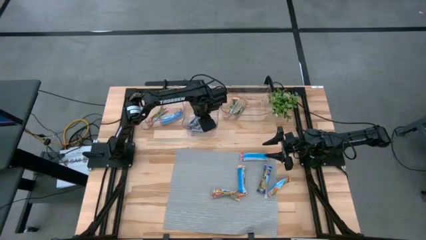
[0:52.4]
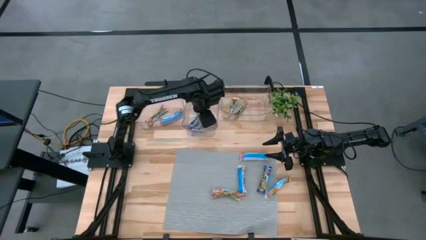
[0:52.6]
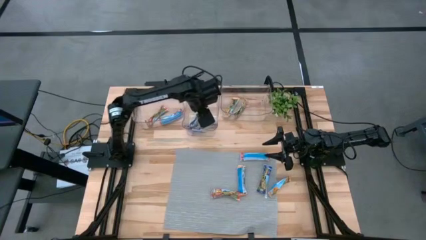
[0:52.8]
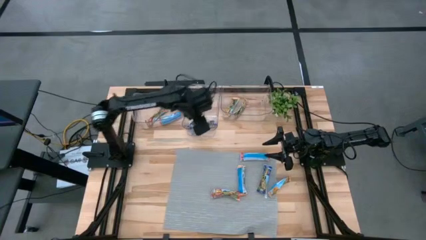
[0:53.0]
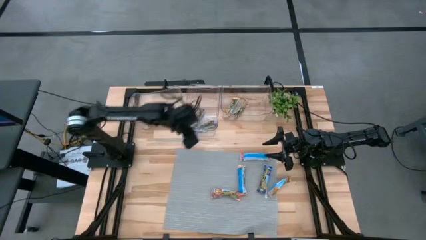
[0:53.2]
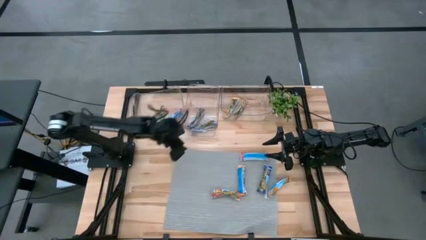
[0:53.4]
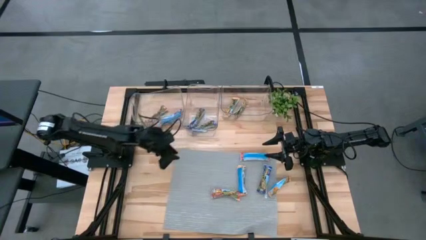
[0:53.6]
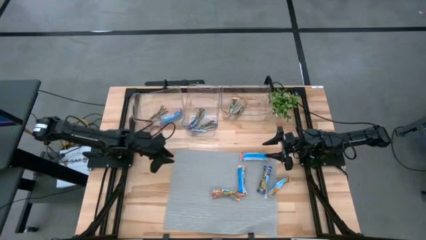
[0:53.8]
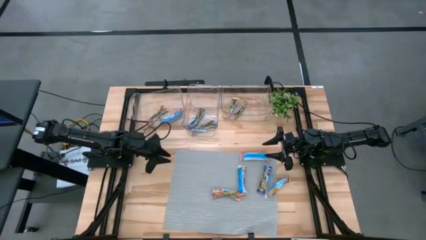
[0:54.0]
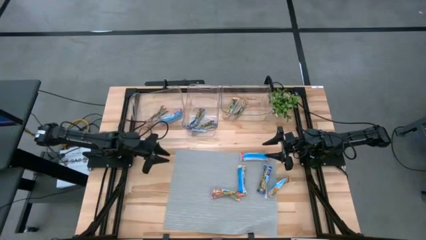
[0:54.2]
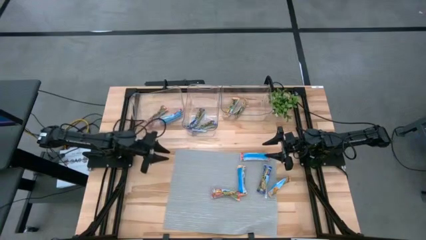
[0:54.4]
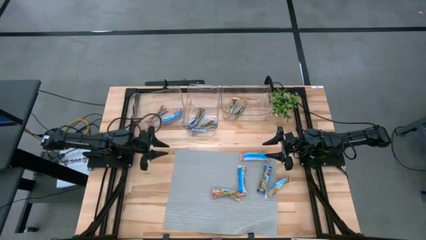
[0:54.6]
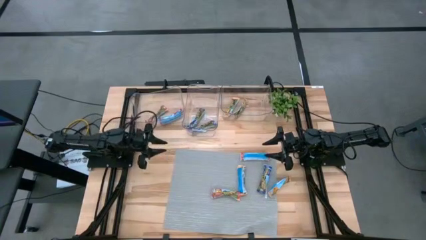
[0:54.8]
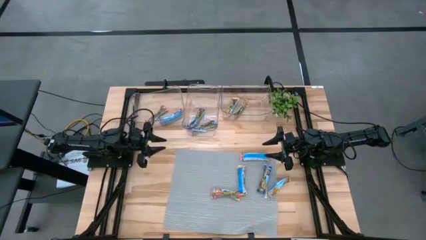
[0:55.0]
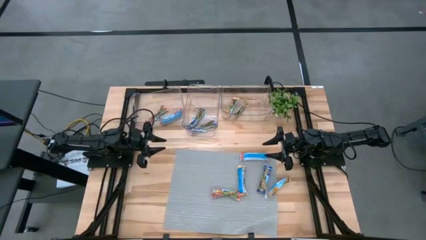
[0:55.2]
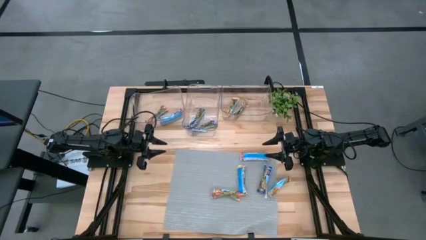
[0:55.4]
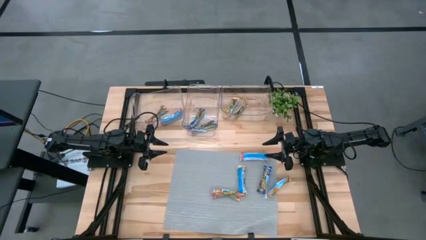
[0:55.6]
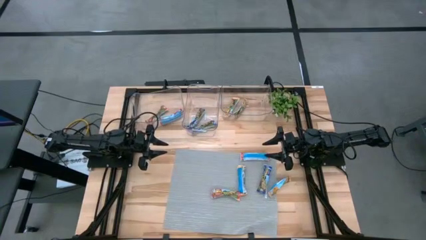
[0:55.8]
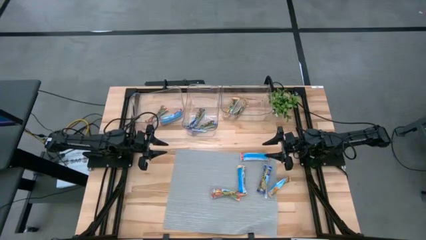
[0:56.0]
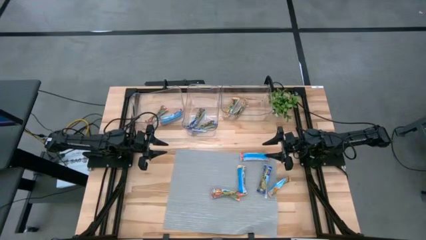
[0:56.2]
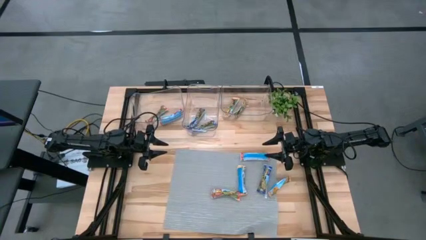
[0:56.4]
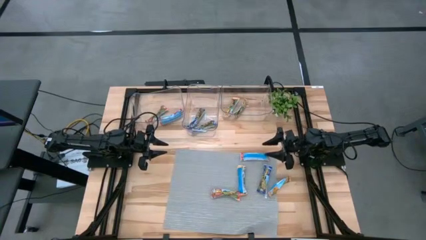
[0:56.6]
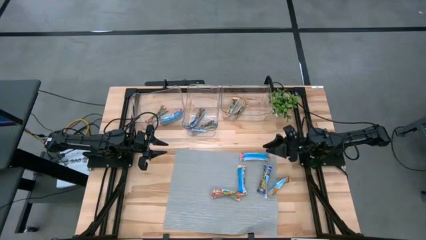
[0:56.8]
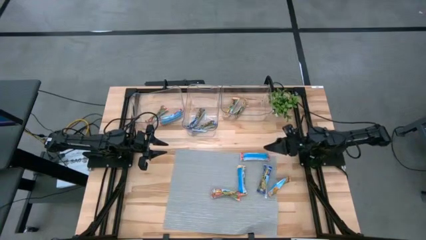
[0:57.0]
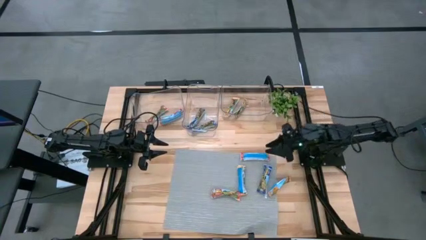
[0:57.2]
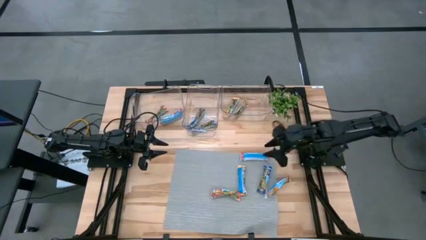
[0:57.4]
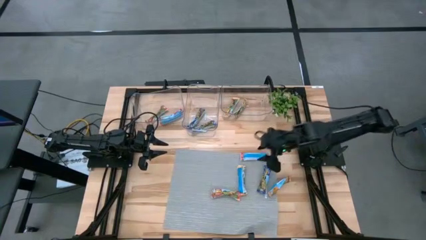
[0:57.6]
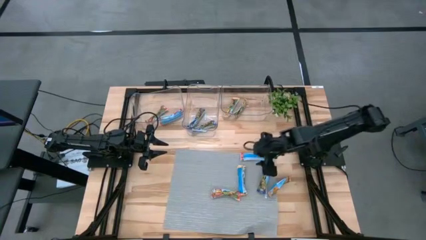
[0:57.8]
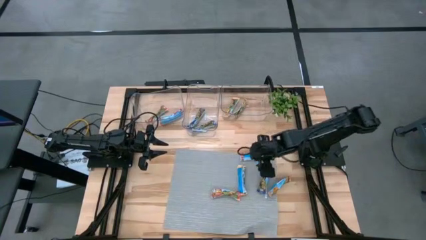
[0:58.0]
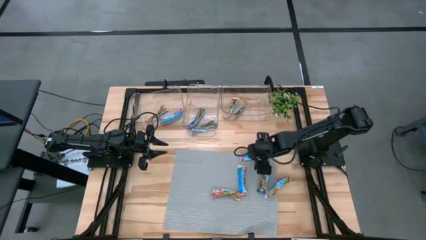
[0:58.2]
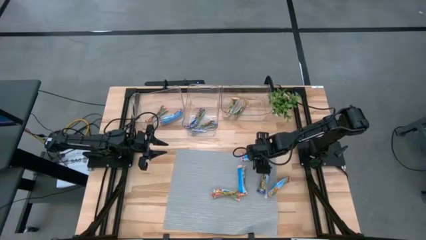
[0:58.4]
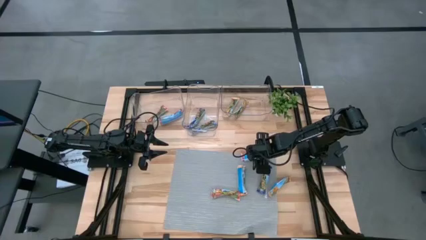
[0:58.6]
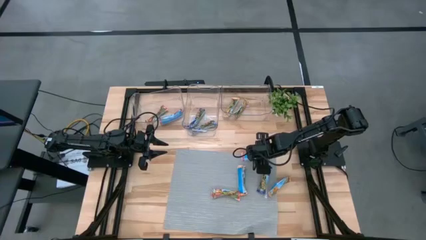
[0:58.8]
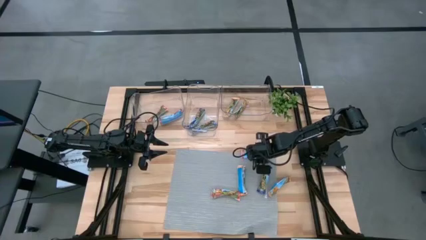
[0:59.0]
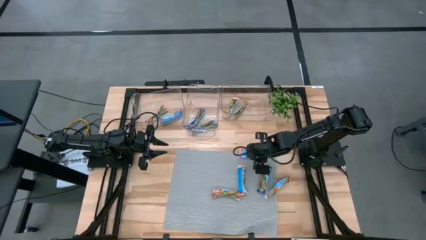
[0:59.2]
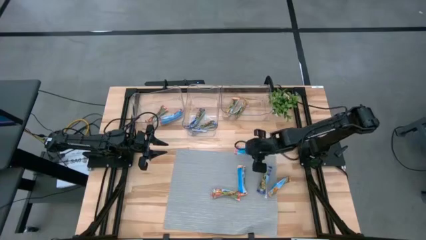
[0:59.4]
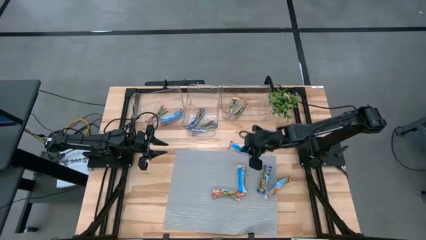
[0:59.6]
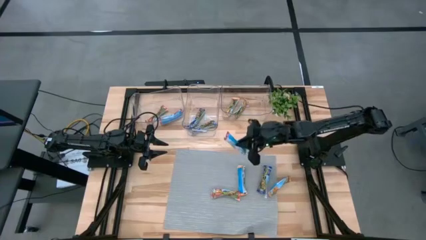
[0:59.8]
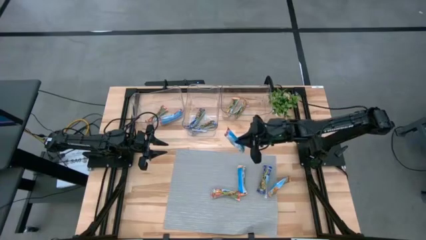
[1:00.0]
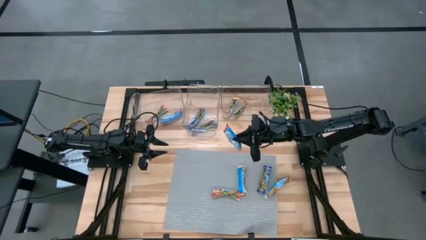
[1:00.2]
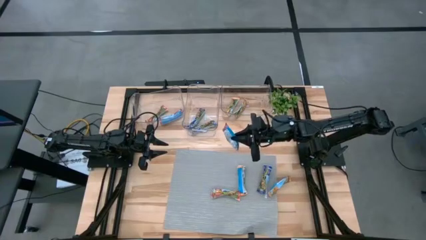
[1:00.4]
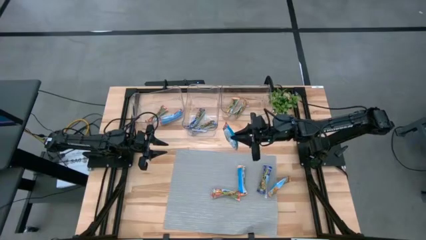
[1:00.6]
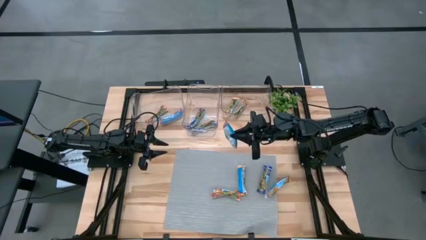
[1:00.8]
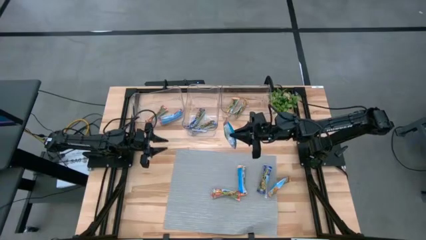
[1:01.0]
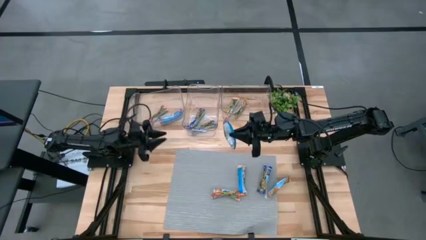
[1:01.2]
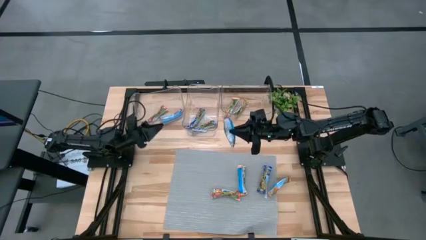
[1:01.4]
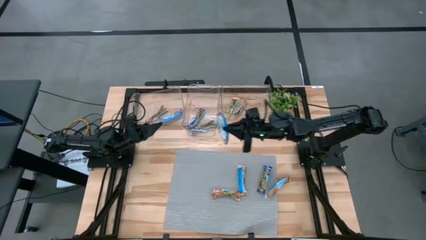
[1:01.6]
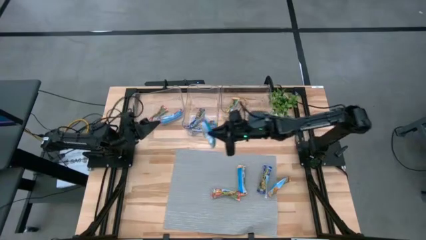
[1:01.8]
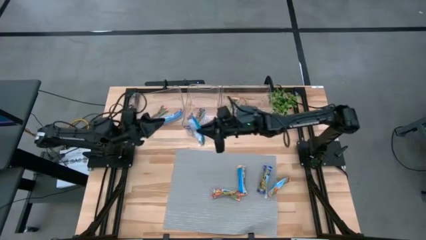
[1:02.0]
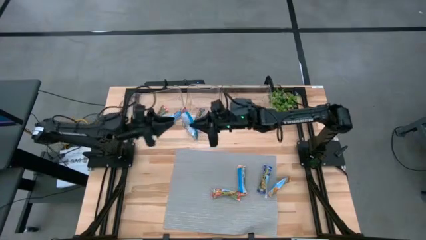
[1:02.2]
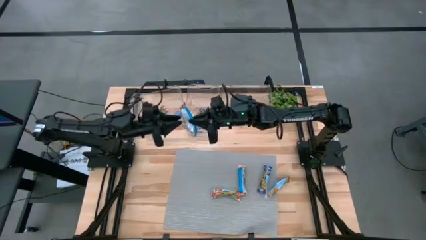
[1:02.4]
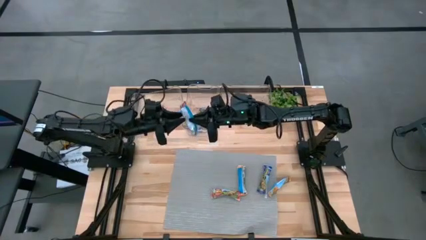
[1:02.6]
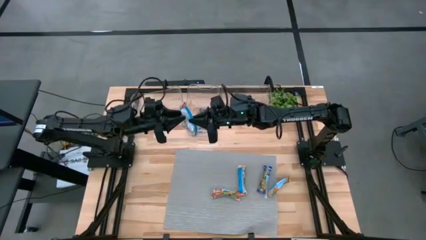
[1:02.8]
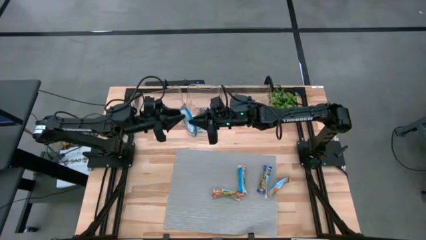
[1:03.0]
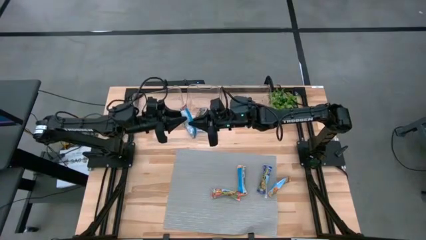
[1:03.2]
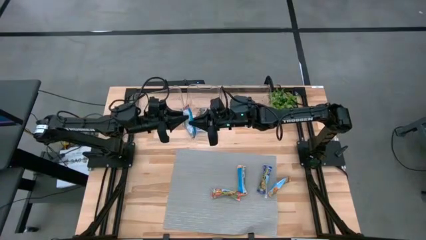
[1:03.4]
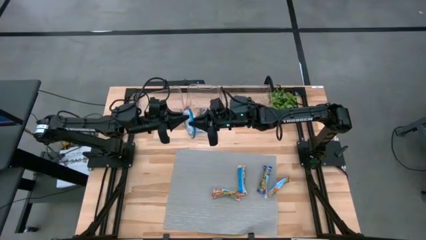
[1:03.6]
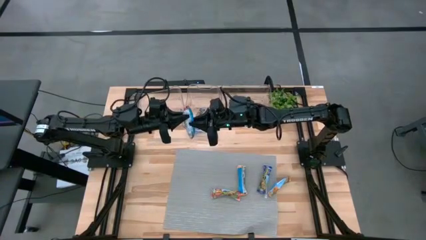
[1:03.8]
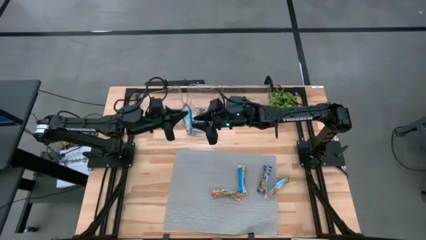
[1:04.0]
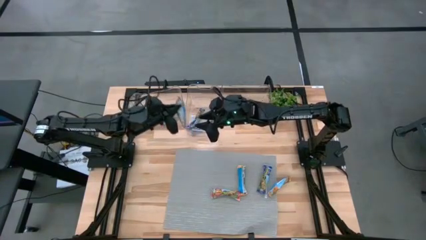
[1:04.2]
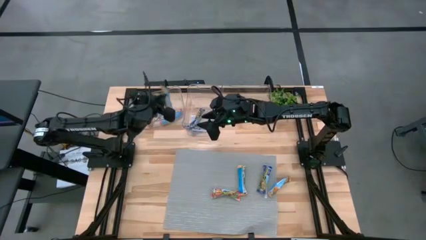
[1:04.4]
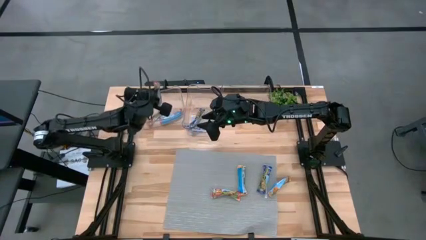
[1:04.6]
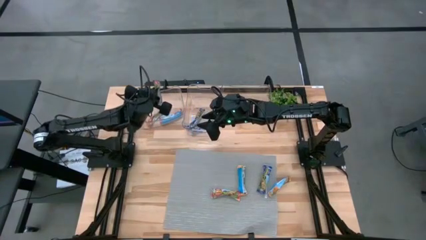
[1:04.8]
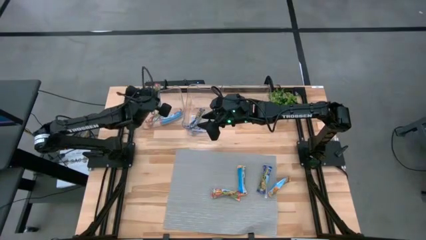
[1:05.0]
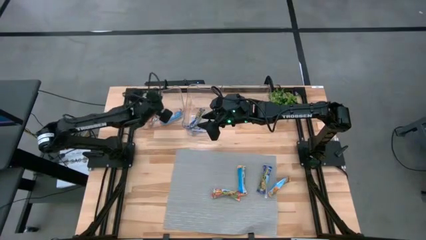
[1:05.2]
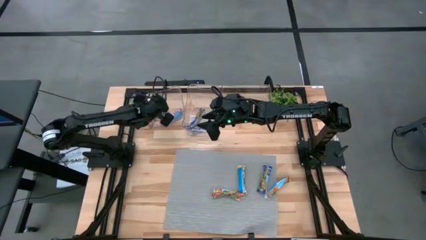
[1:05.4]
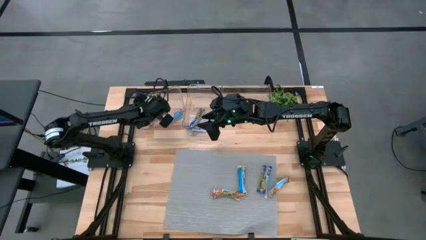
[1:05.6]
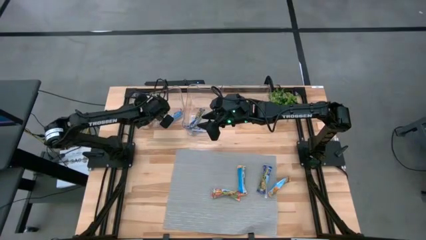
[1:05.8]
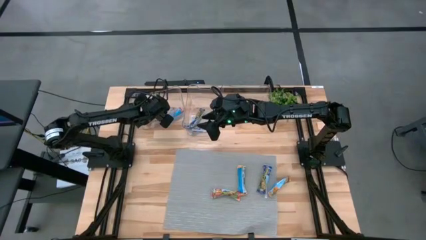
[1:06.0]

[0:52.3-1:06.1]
Task: Pick and place Granola Bars by type
Put the top red granola bar into the left transparent bin
